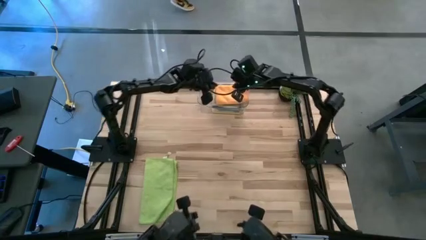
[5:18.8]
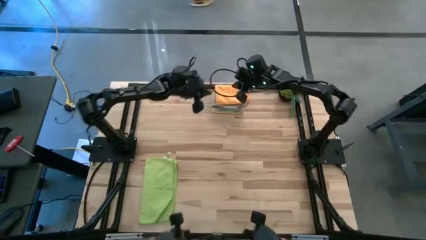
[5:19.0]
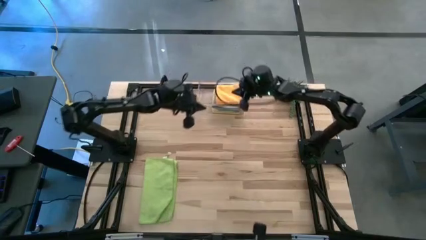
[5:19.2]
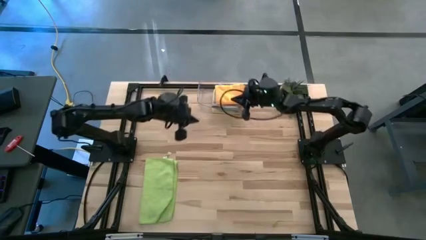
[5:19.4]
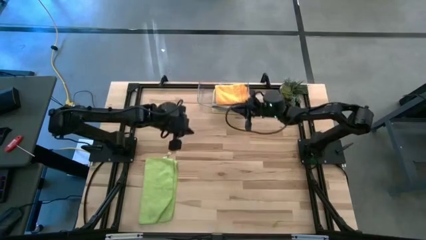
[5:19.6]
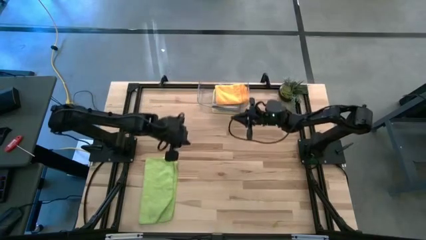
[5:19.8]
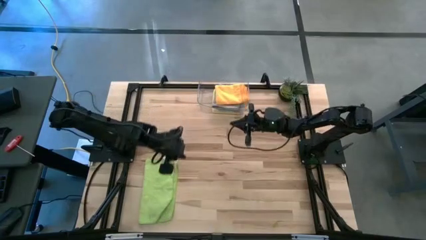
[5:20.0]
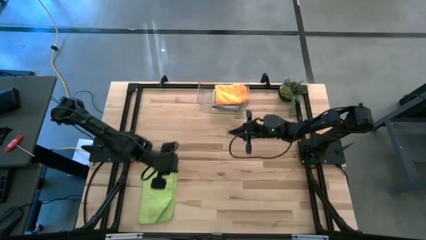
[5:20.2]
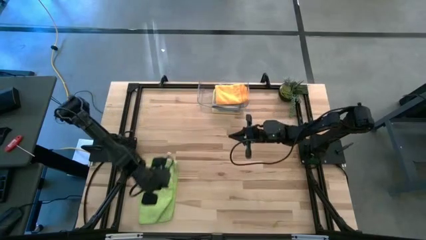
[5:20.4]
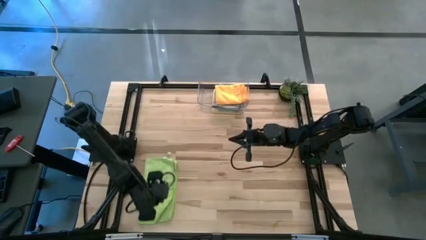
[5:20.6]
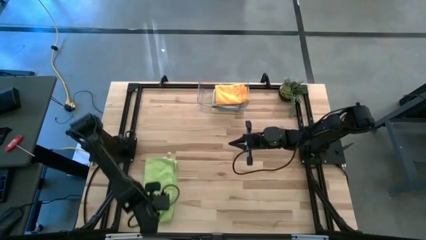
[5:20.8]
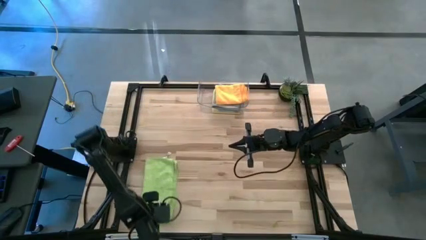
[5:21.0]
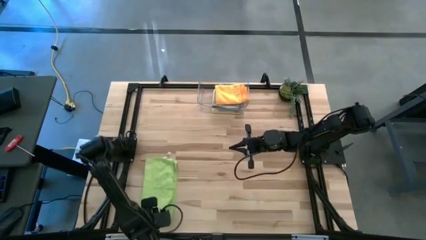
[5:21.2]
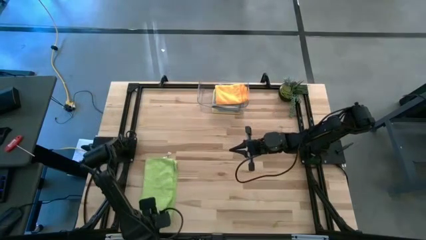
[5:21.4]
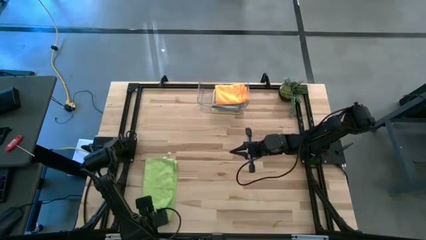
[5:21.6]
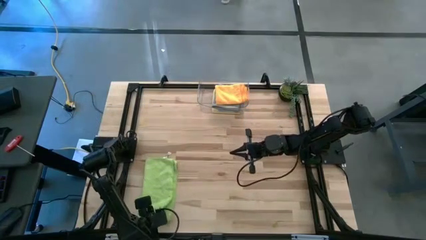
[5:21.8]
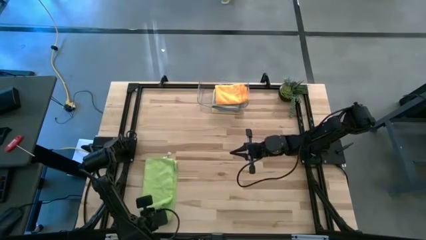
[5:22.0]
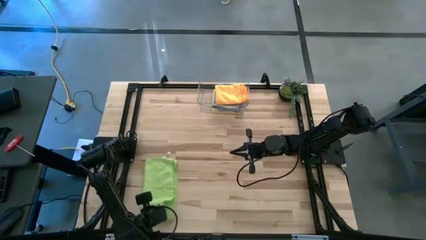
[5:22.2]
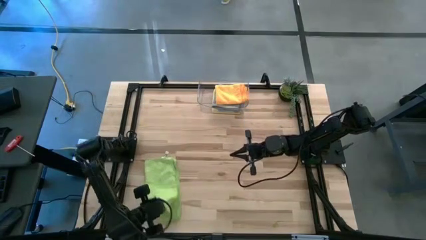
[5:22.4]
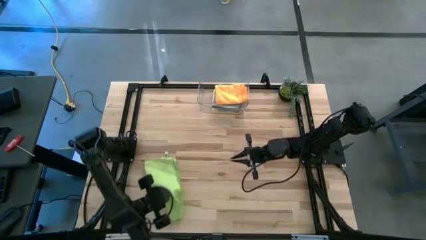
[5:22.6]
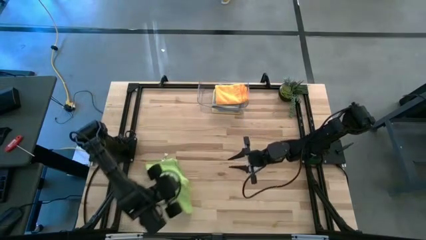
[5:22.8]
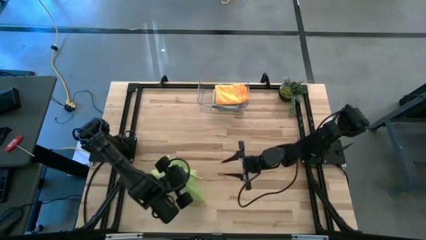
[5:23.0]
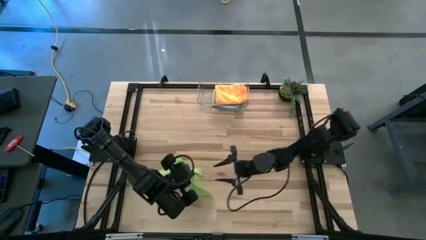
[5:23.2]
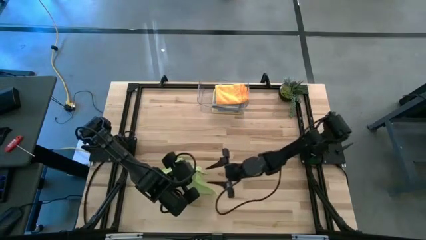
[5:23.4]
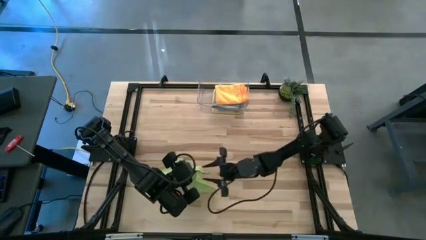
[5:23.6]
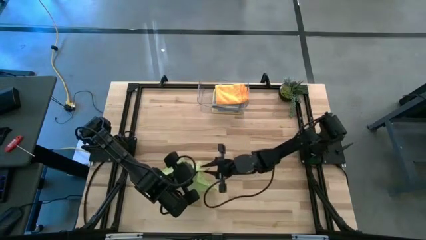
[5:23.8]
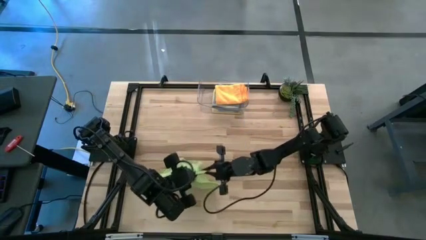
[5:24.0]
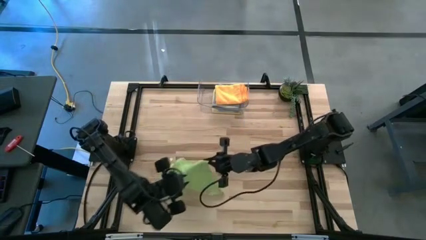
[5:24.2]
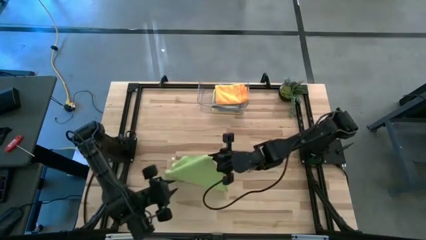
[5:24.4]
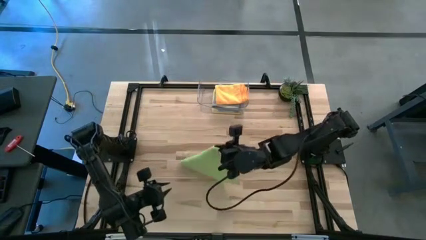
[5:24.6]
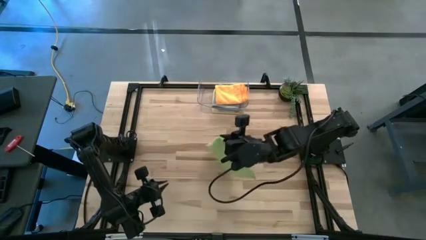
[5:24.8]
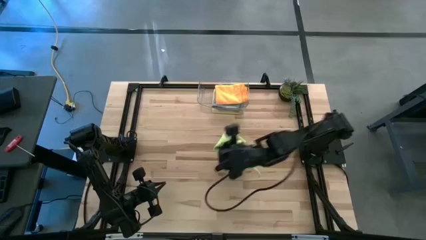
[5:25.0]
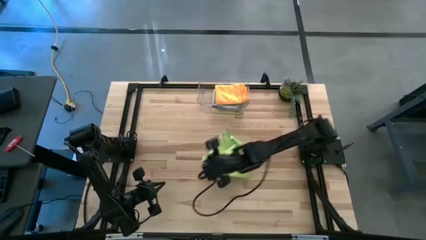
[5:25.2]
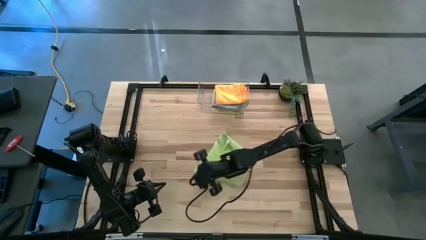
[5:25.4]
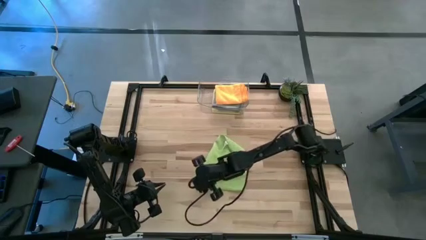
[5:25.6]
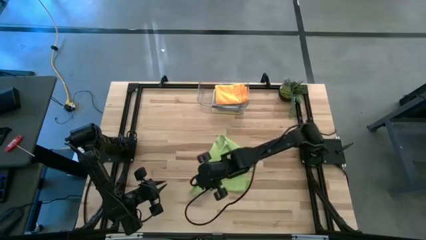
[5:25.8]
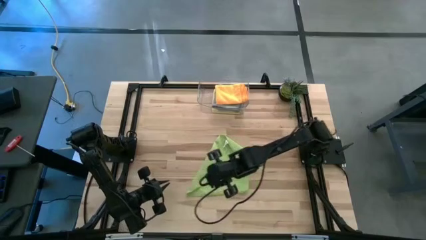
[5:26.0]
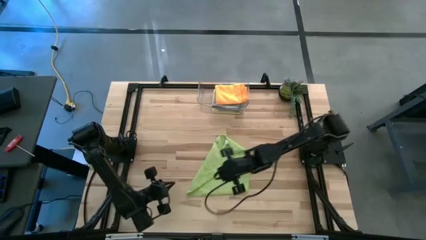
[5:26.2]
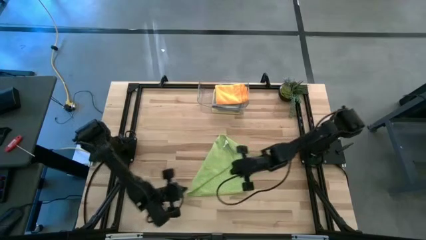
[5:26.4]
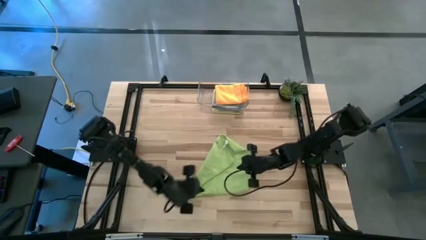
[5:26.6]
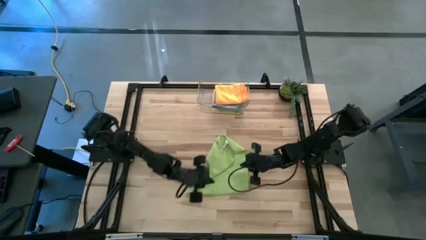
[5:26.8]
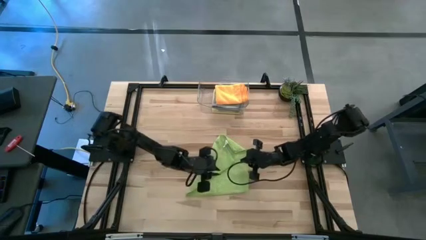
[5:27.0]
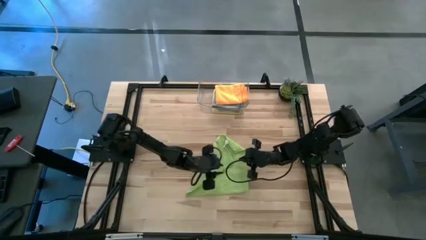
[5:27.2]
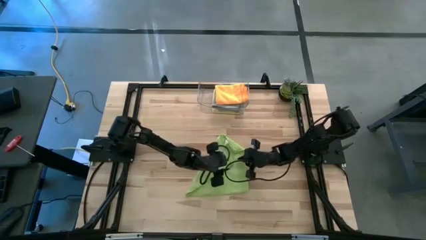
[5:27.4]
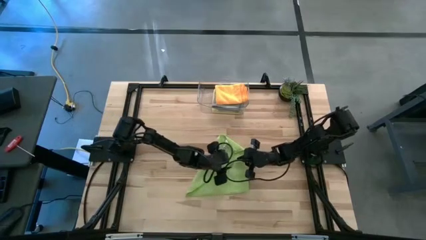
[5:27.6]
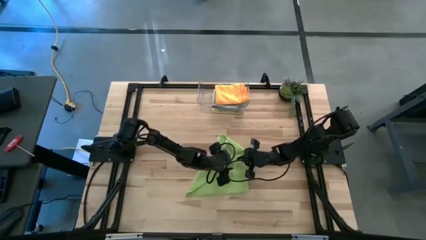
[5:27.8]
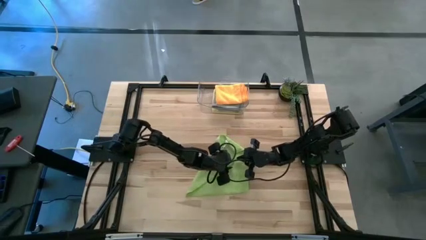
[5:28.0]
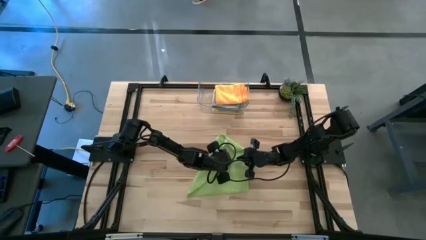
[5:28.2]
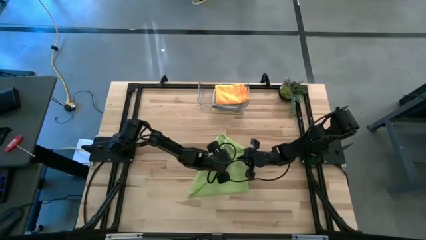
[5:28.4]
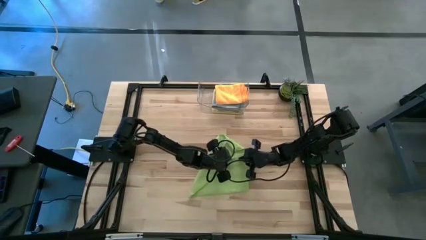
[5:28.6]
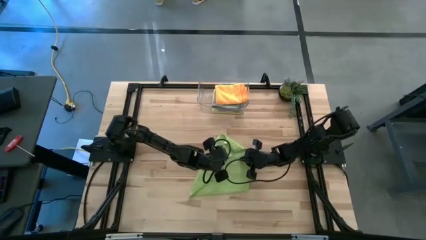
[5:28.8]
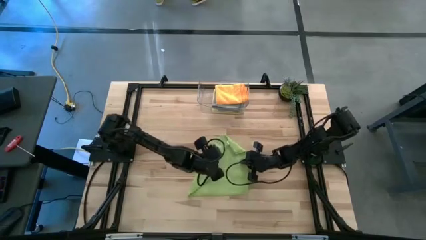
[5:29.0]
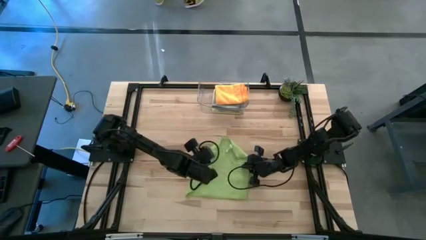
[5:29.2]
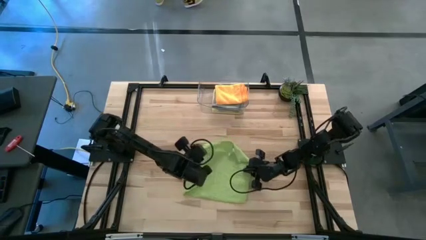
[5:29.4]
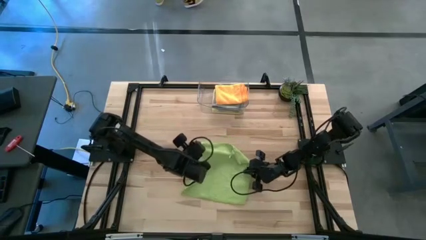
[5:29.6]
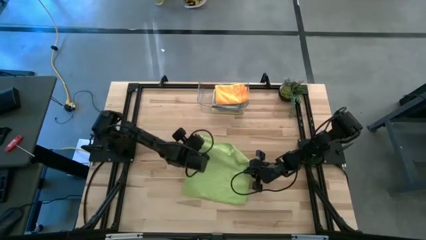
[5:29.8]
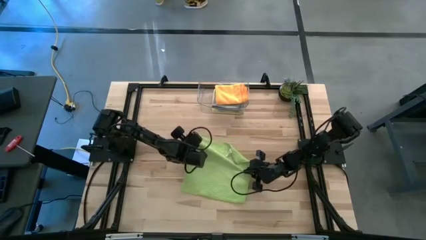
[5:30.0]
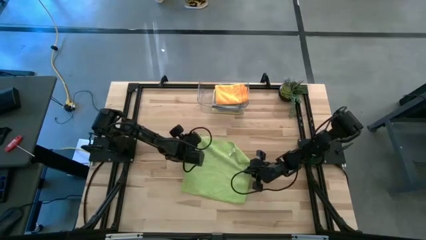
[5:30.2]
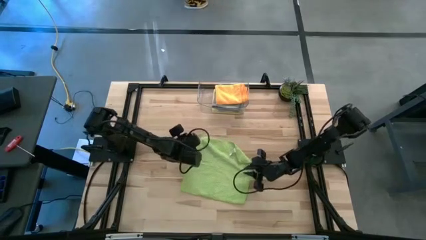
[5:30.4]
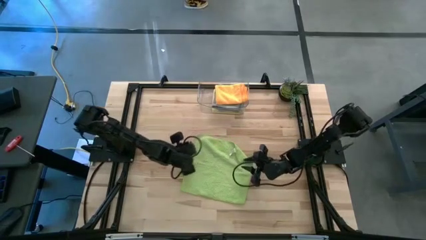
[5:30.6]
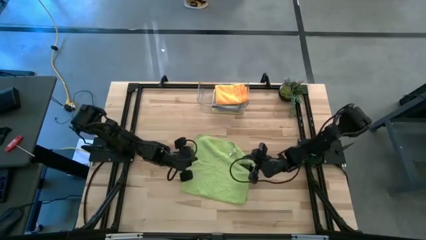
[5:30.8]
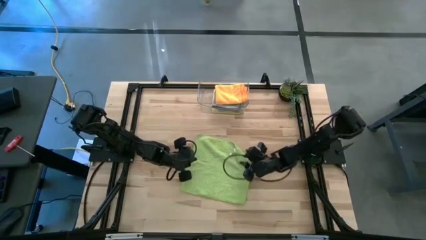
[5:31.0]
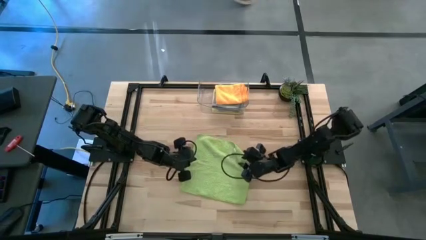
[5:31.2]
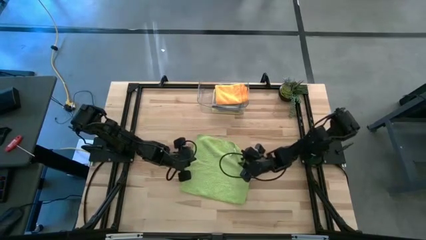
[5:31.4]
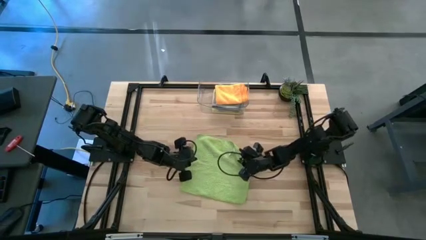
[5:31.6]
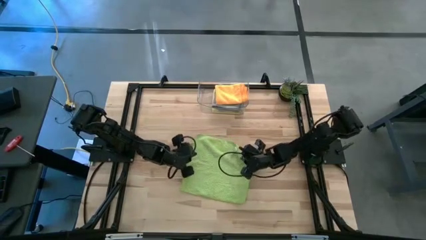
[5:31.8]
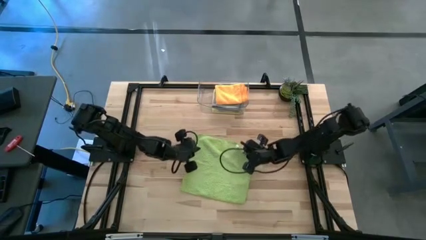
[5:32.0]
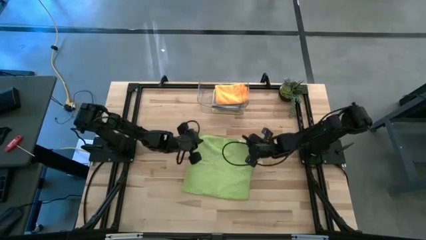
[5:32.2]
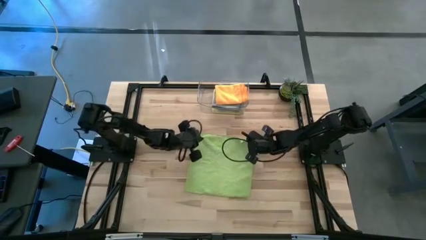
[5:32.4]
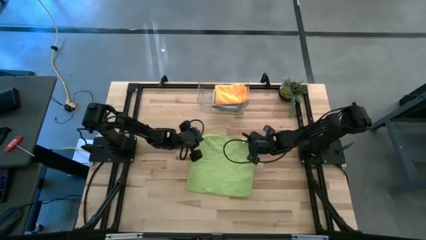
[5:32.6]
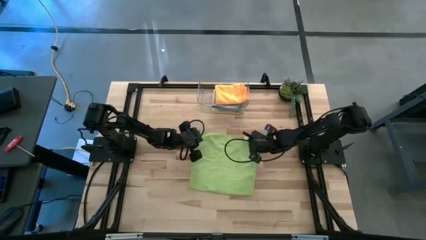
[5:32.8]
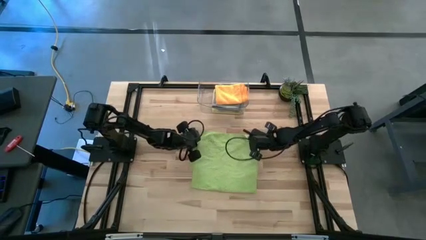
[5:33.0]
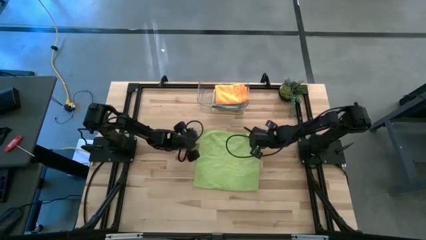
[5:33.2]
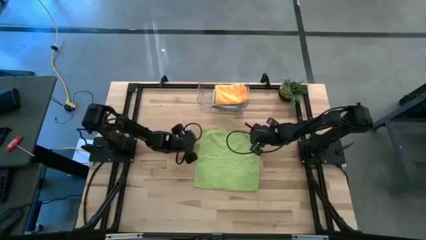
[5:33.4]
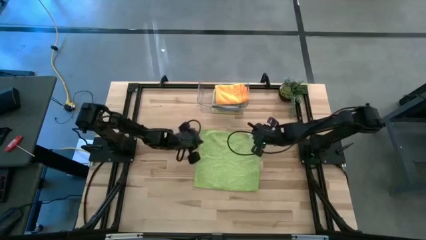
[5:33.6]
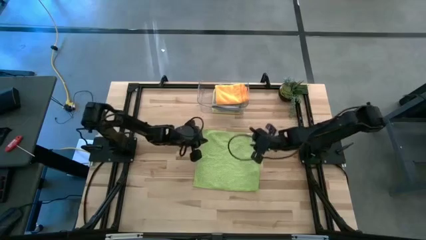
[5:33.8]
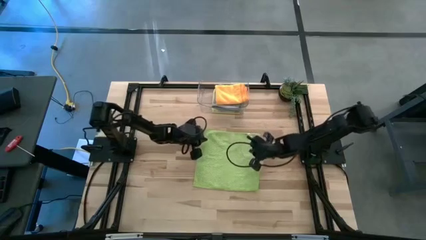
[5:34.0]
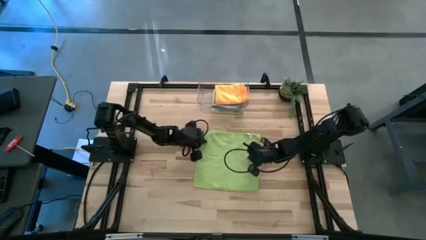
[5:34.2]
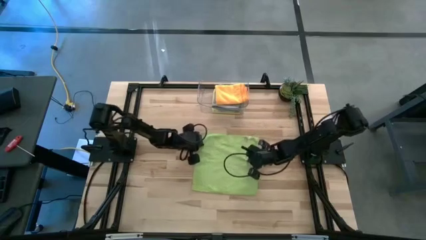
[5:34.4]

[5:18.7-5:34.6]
Task: Fold microfiber towels
Fold the green towel on the table
